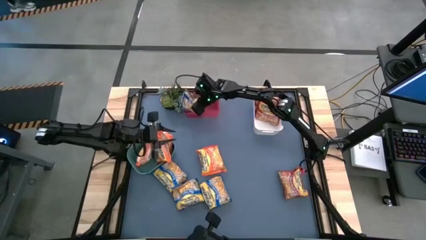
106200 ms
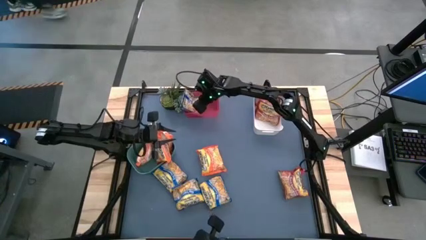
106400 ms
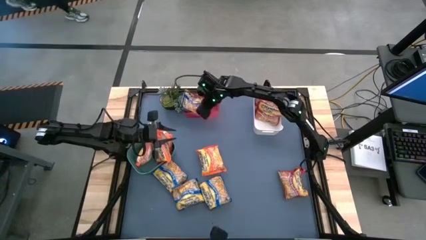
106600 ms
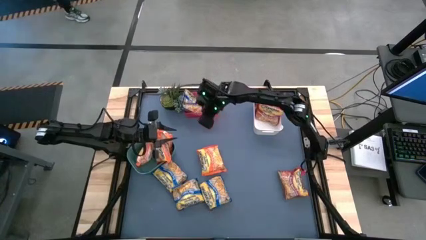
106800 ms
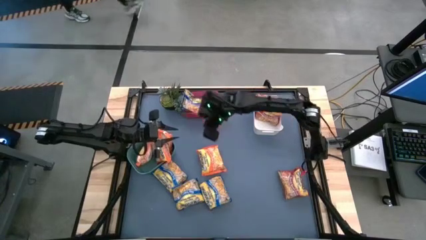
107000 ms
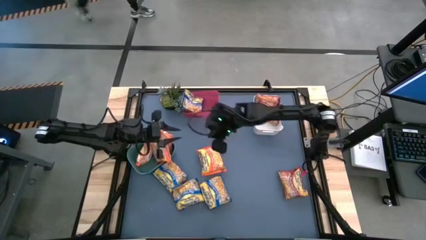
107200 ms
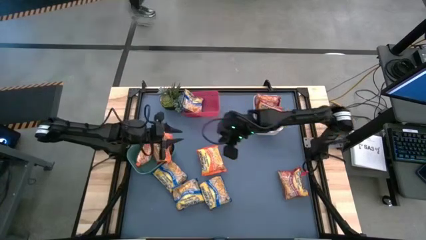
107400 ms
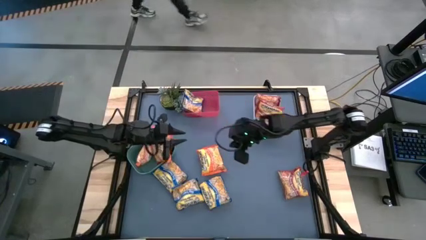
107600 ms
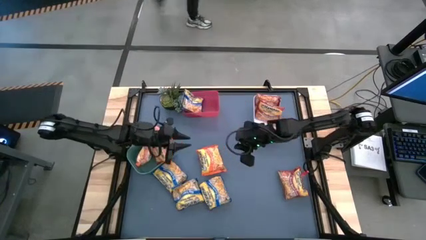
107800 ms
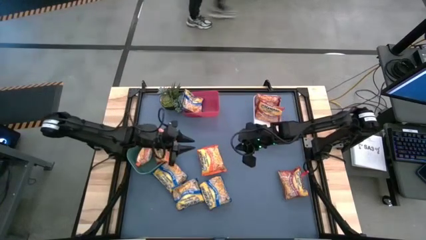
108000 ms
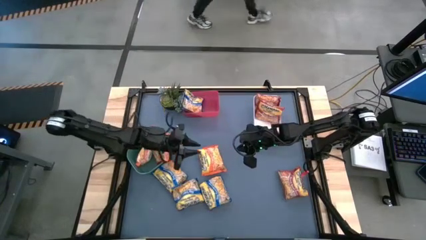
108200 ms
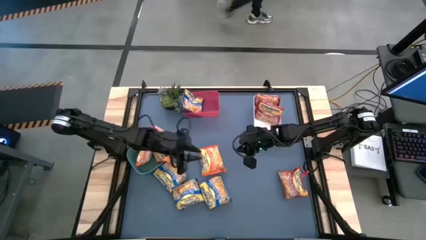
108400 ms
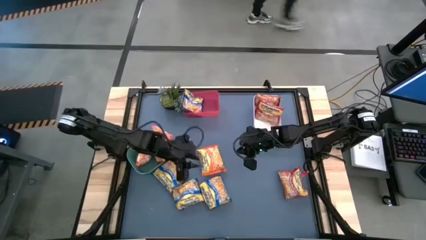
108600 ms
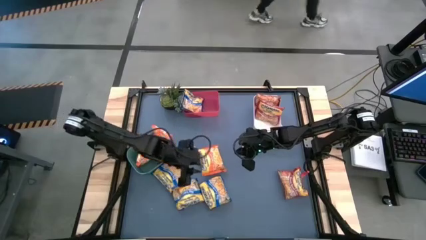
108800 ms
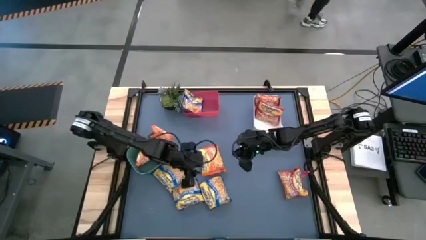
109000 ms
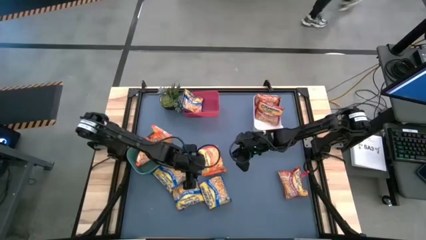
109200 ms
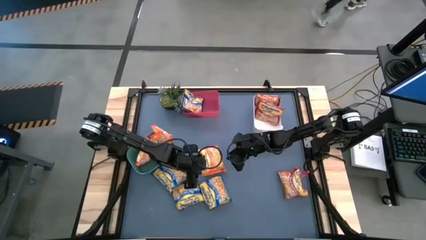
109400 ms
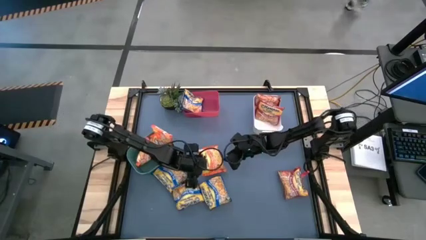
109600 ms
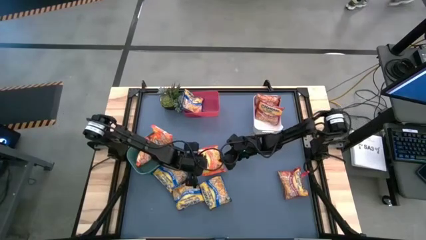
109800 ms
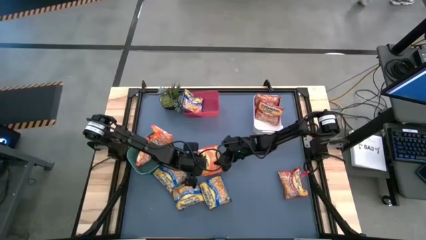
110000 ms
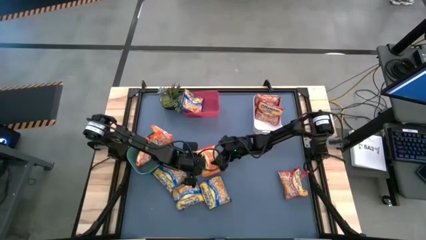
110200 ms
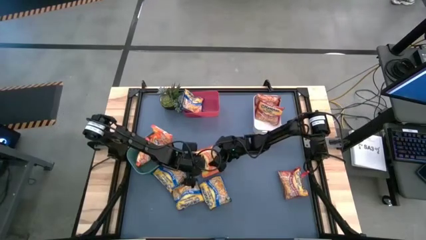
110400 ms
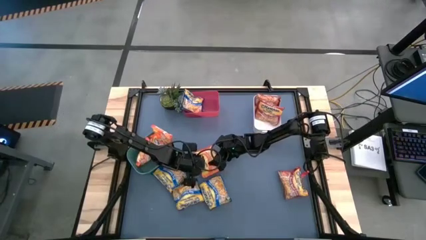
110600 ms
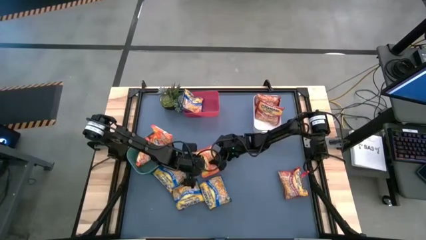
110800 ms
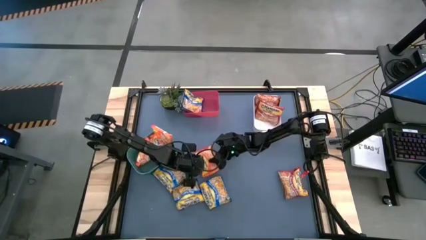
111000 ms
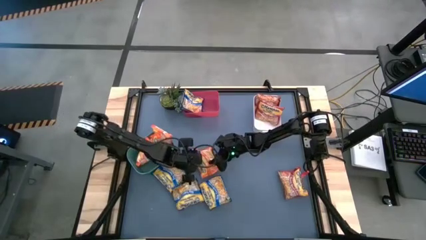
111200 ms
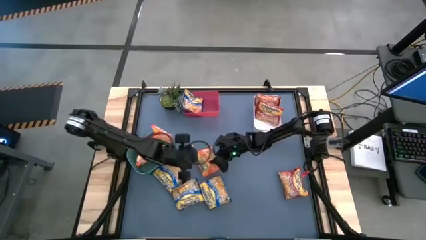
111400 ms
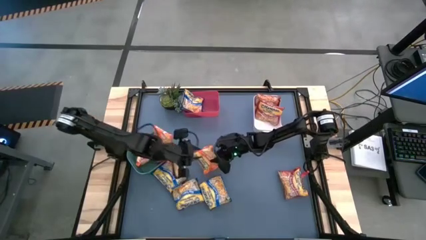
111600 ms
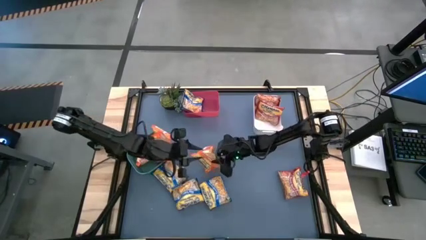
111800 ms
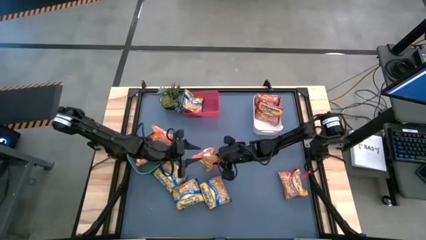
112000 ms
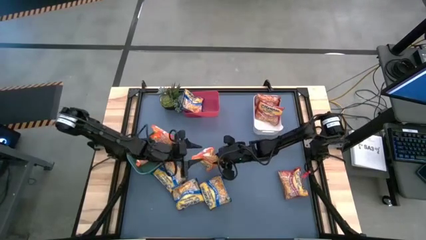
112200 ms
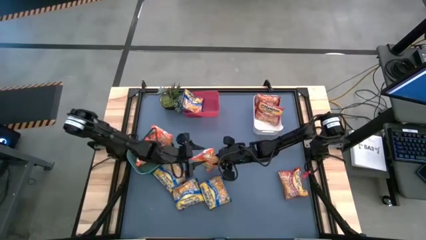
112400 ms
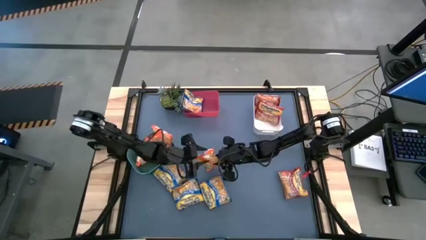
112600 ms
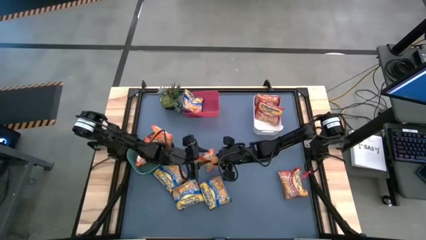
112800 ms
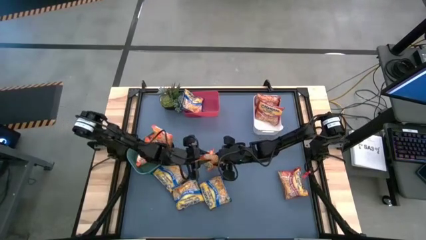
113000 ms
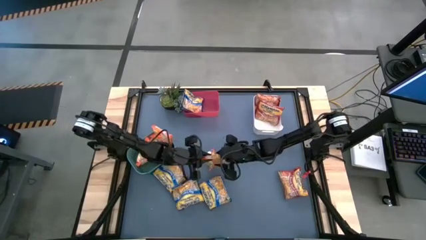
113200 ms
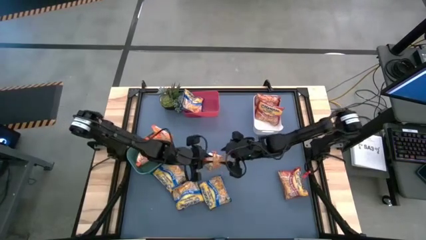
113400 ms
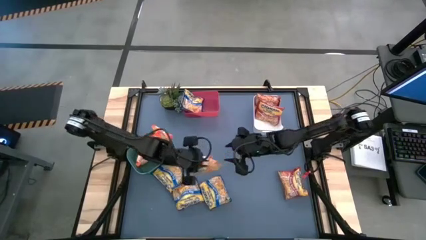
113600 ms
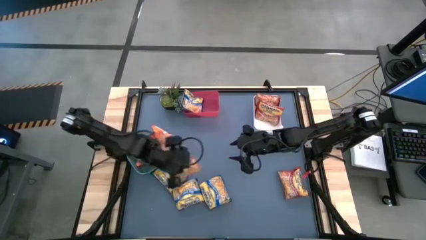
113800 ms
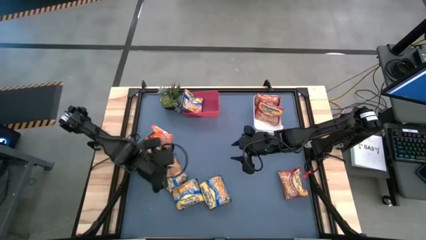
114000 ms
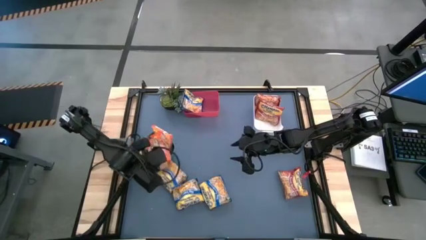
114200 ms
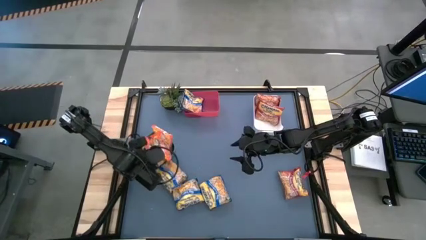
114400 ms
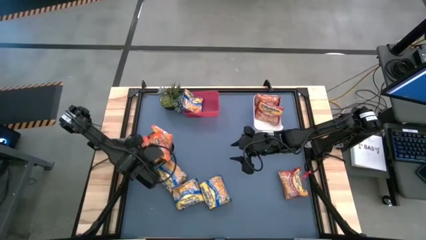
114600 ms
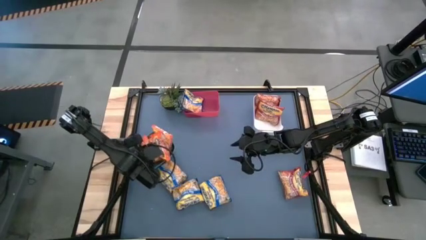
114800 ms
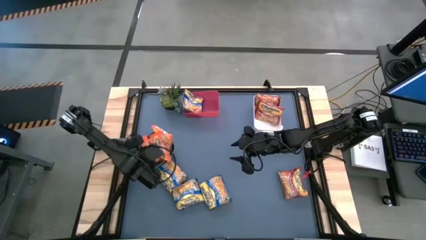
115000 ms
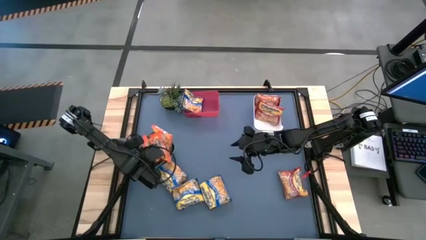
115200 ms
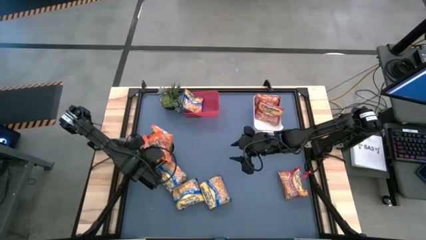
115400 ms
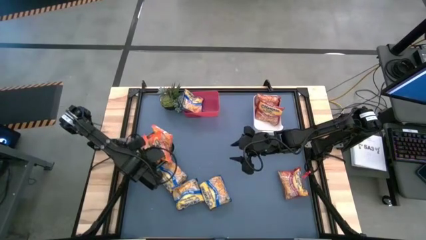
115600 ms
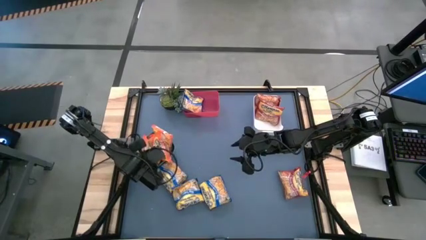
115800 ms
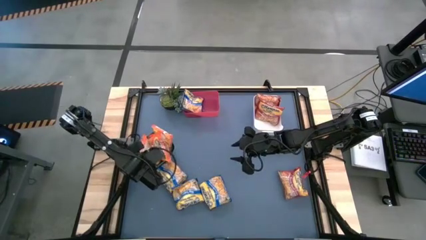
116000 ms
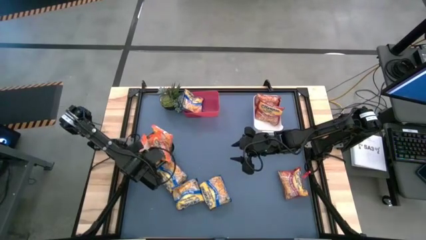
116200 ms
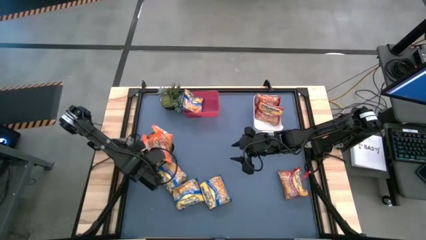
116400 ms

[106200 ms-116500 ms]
Task: Sort Maruchan noodles
Put the orange noodle pack into the green bin

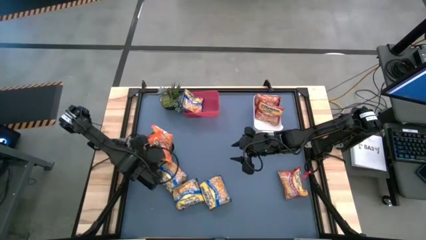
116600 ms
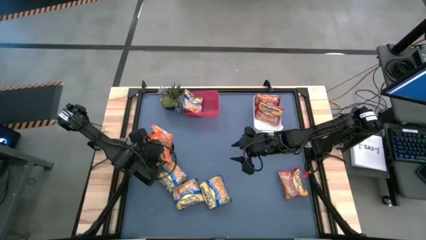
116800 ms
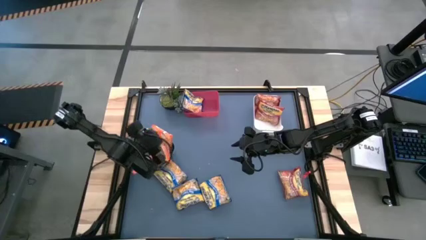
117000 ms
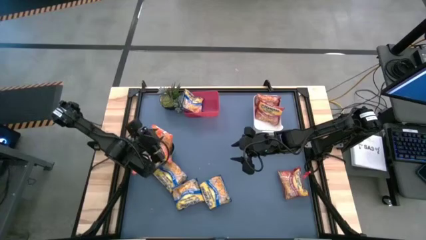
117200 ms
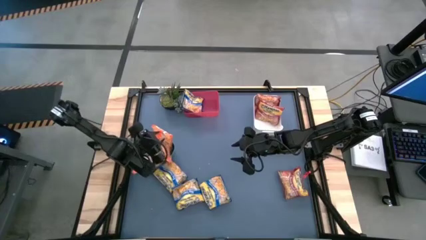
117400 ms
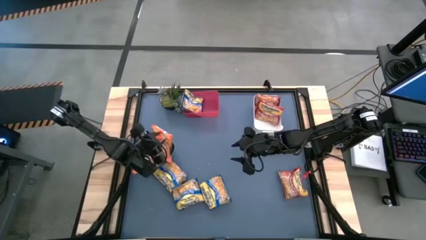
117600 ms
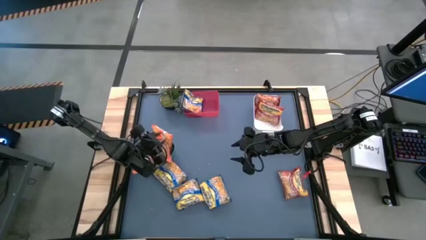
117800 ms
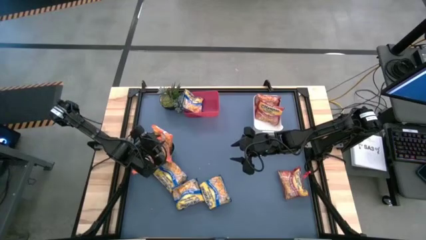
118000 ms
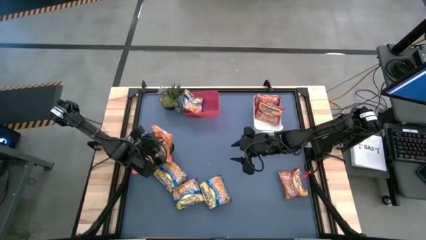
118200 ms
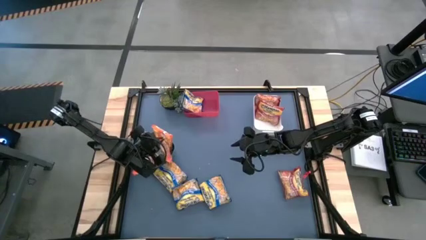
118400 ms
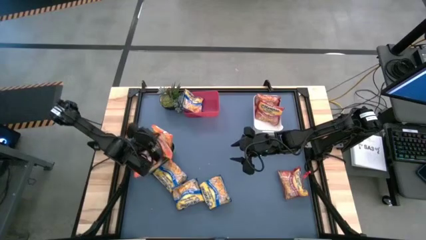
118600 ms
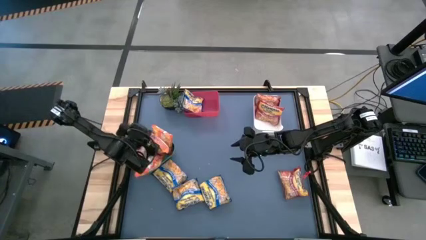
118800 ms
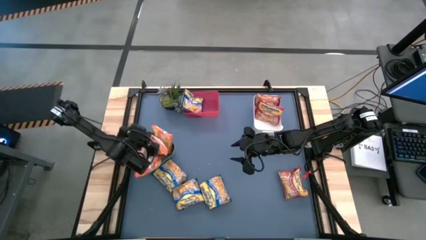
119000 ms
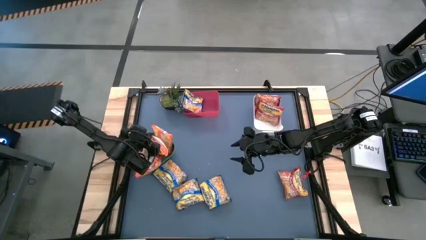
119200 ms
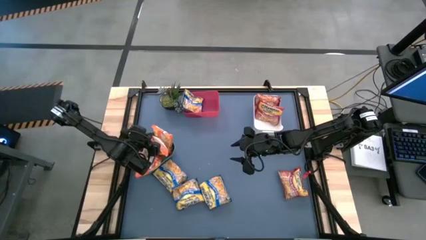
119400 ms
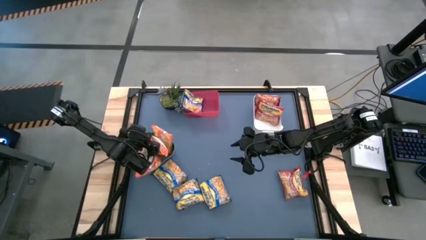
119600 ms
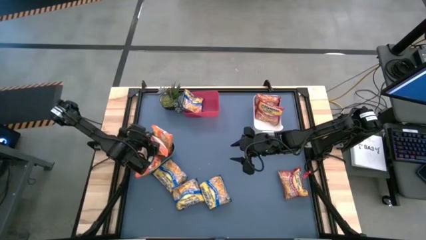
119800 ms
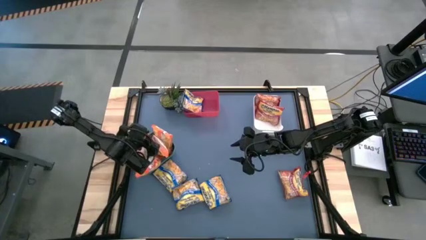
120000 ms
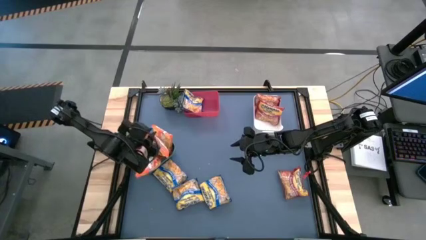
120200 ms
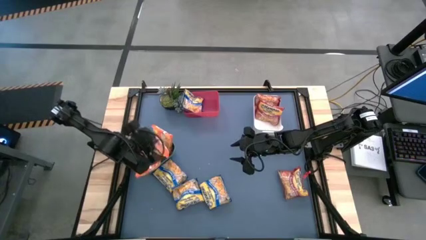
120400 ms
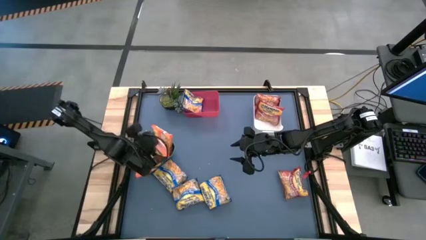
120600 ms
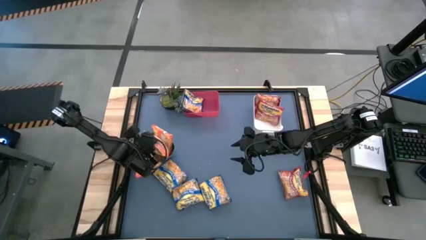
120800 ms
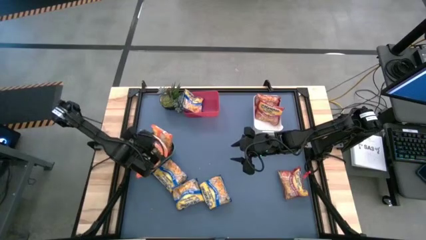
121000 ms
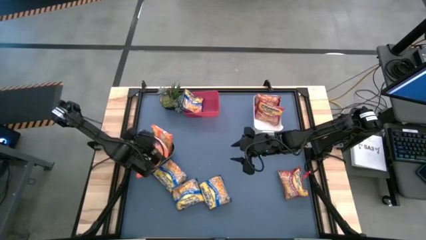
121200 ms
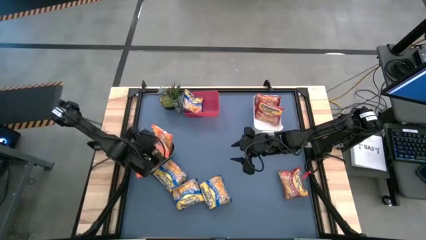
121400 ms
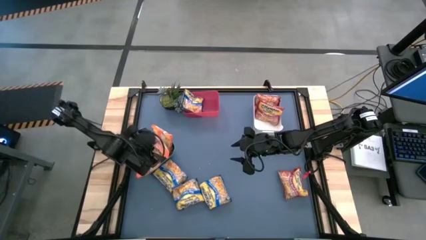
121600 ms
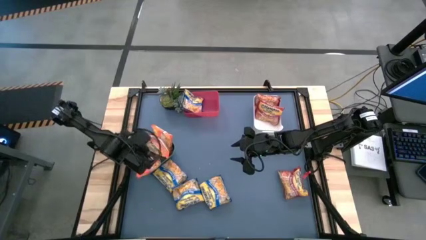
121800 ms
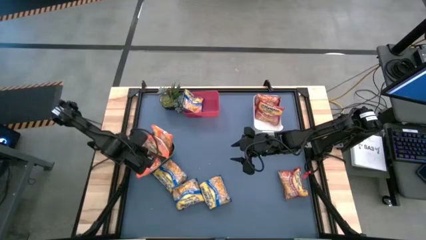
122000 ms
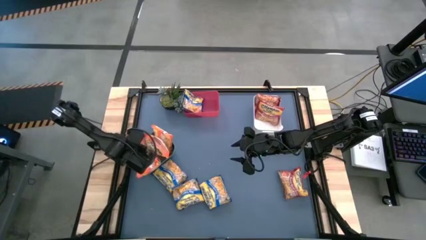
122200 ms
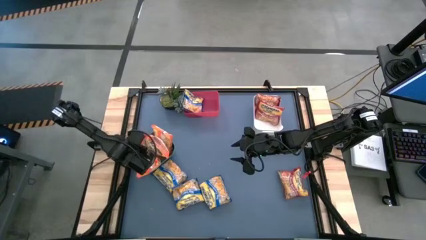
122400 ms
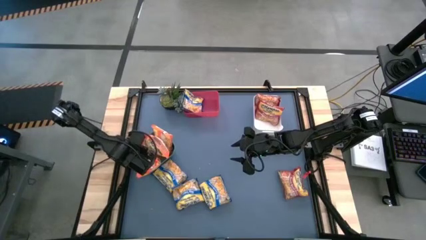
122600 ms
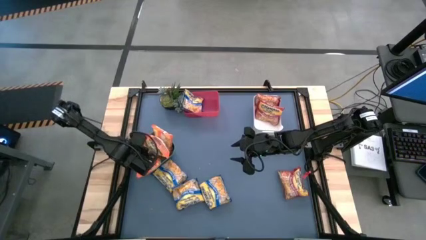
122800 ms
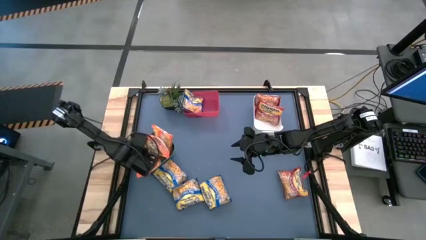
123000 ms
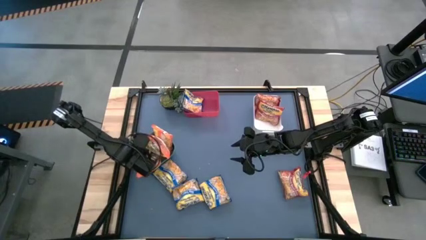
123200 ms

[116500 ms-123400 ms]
Adjust the orange noddle packs in the green bin
